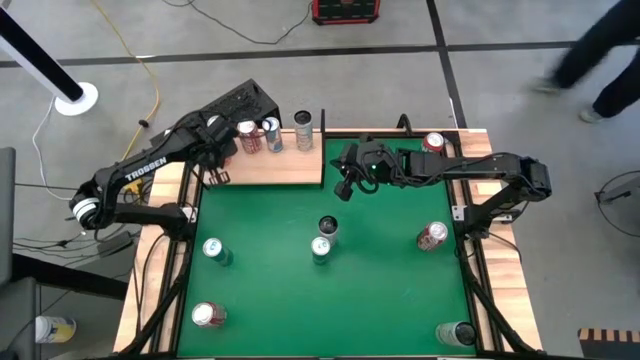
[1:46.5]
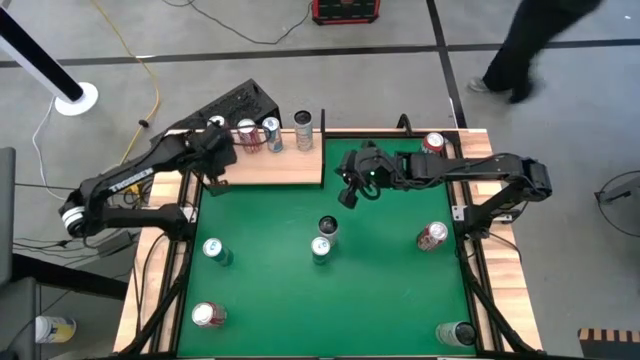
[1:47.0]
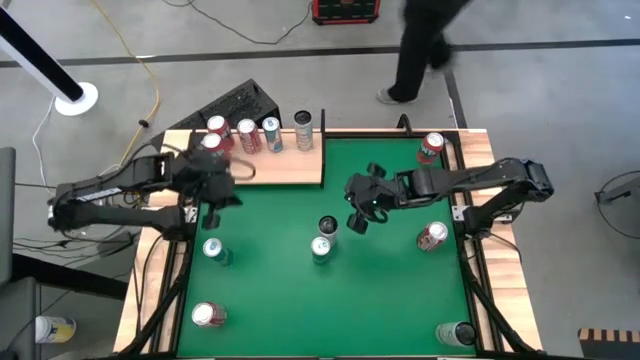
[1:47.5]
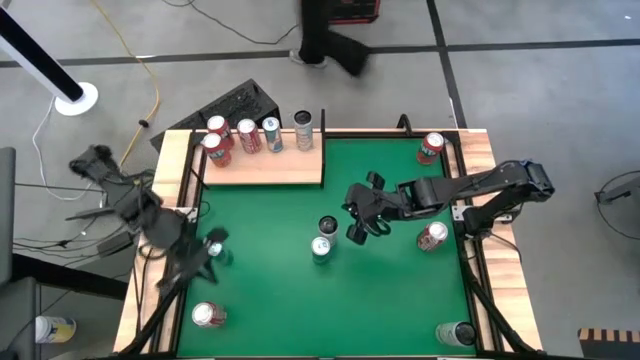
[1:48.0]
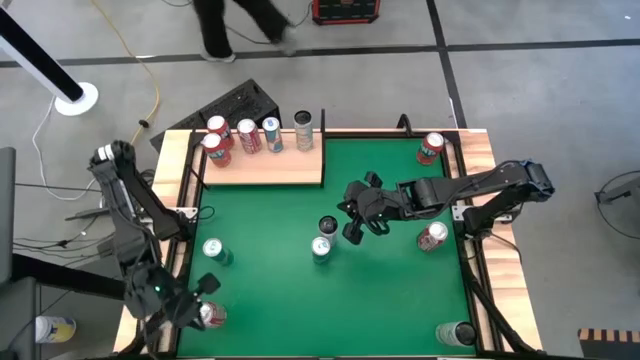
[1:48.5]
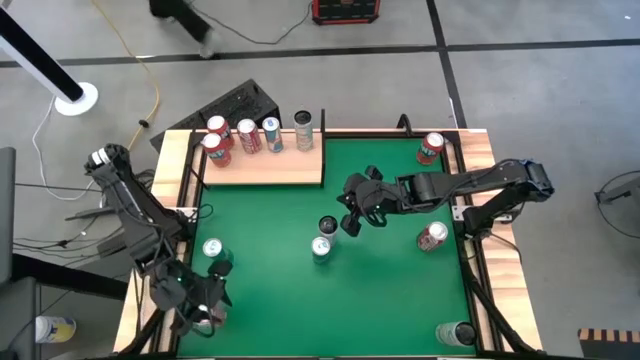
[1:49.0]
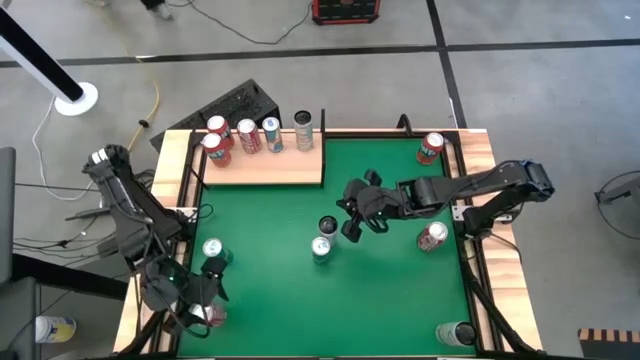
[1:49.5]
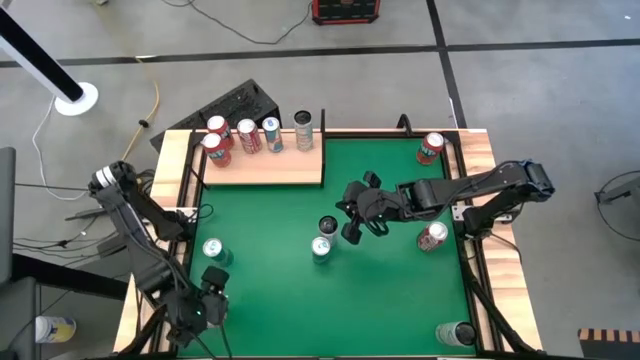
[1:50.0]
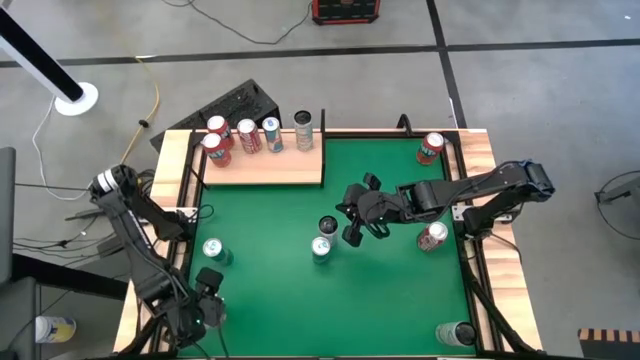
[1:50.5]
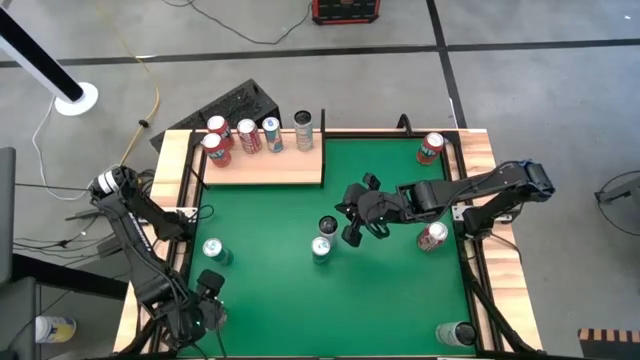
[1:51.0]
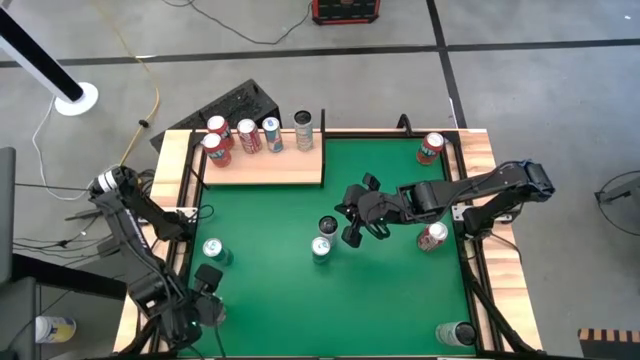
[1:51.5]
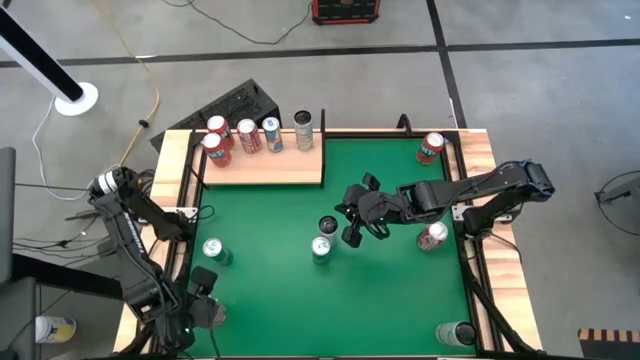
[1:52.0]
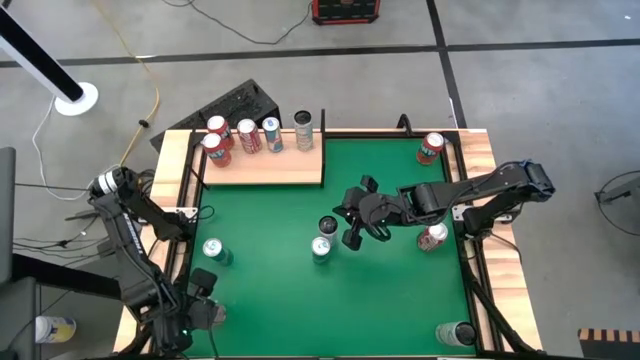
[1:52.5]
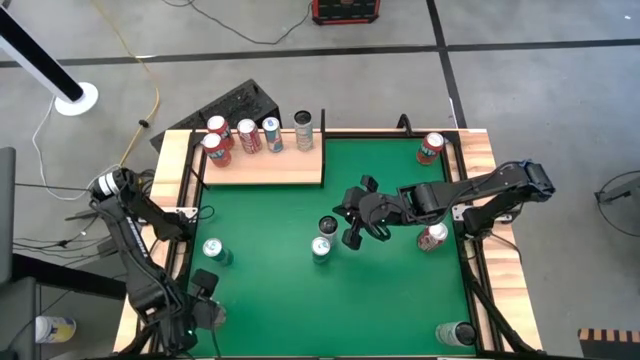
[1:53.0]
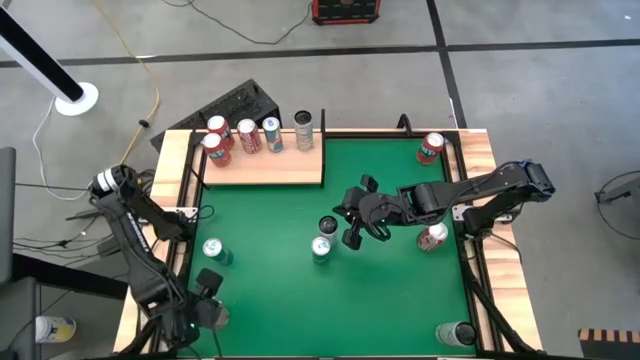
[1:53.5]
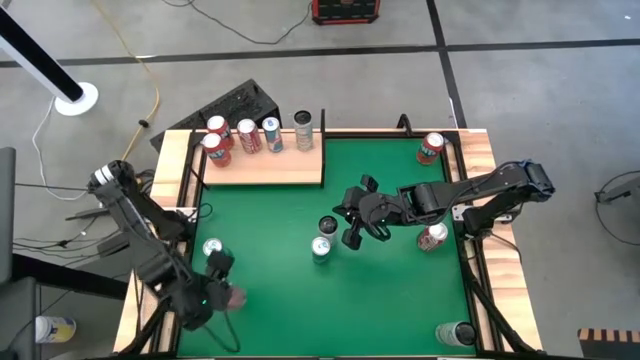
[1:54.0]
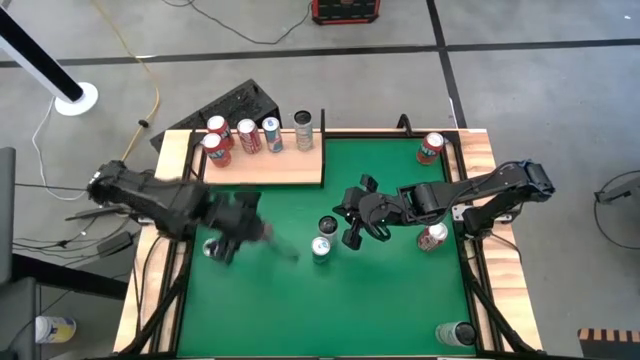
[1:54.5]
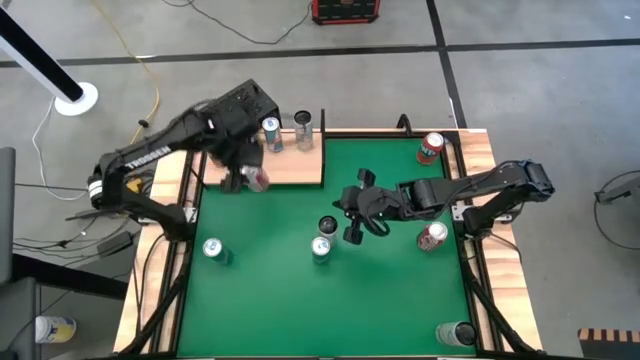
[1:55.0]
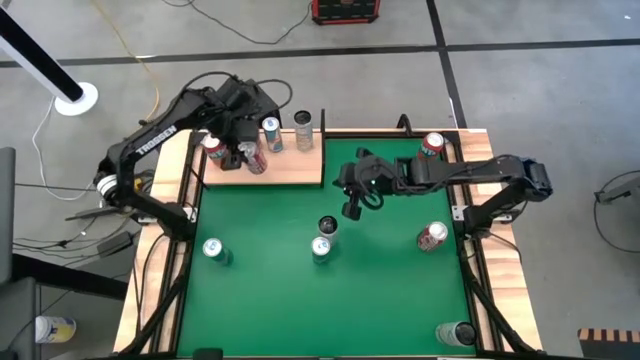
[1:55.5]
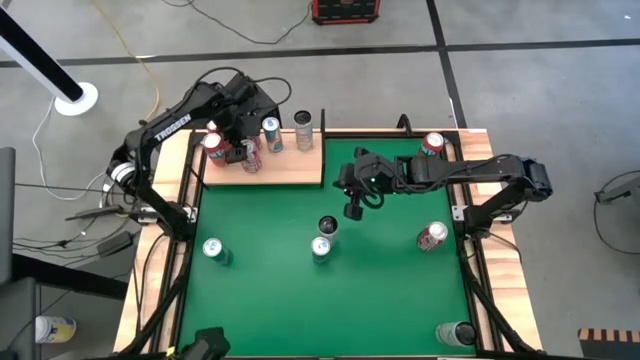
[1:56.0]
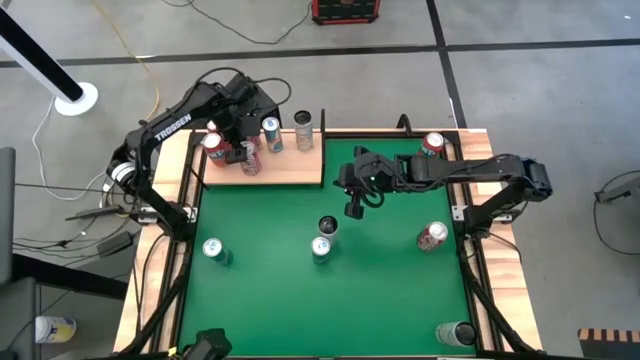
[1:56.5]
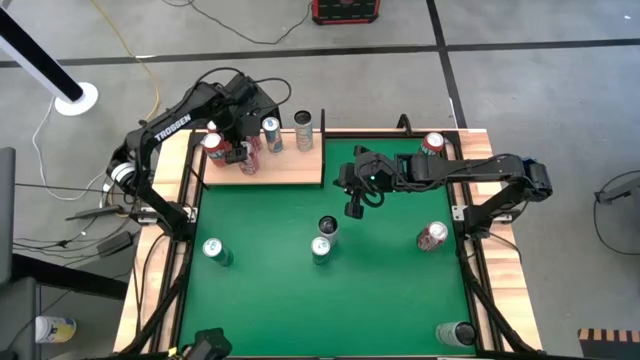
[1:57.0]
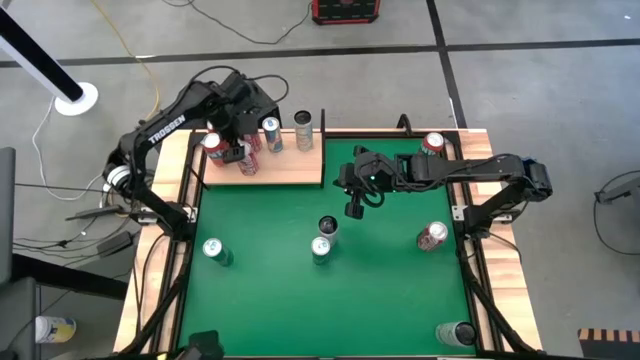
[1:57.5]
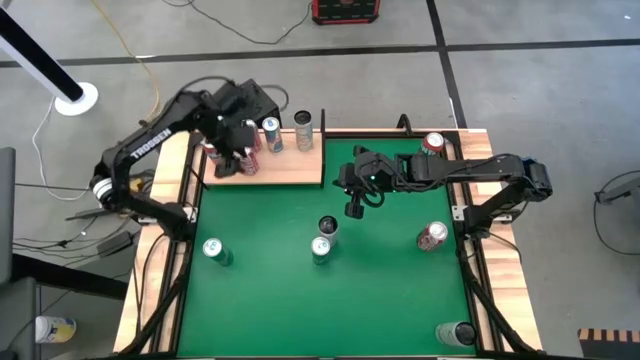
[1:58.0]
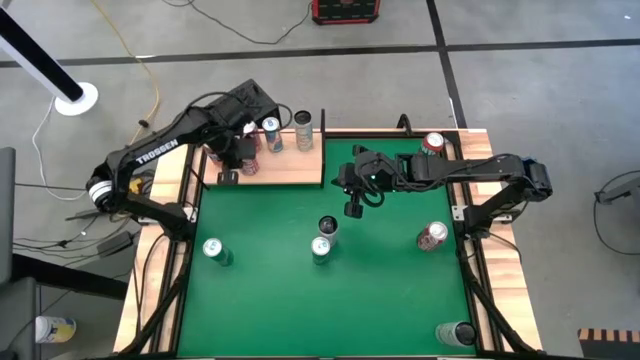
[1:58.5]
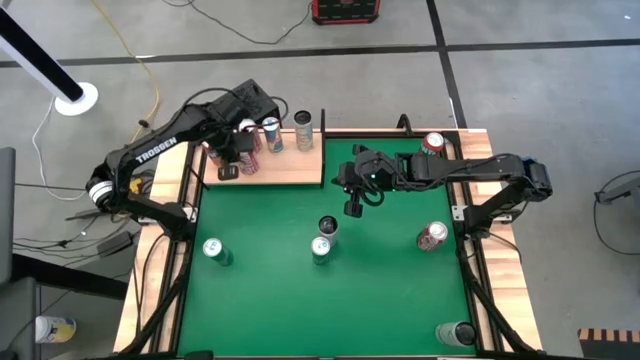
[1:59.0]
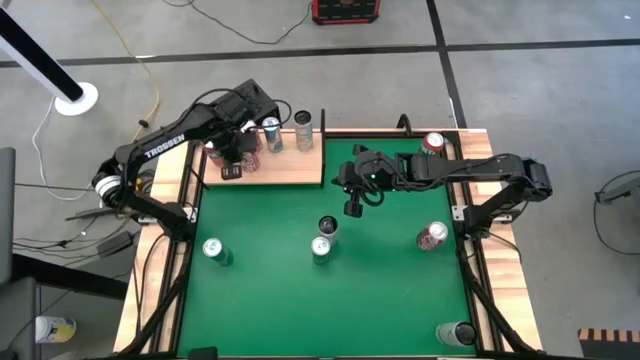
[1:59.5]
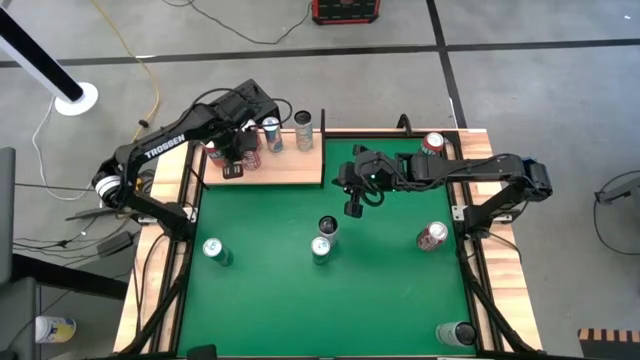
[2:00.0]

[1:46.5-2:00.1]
Task: Place canned beverage on shelf
Put the bottom red and white soda can on the shelf aligned with the other red and white soda can

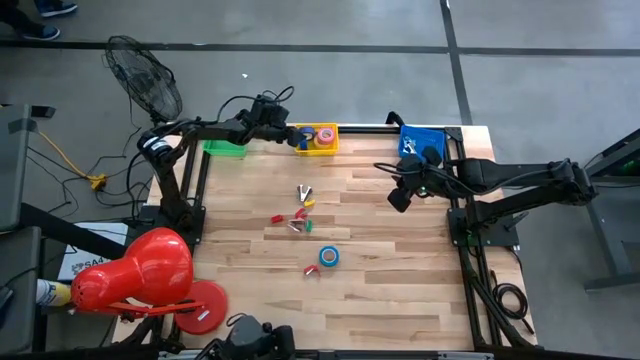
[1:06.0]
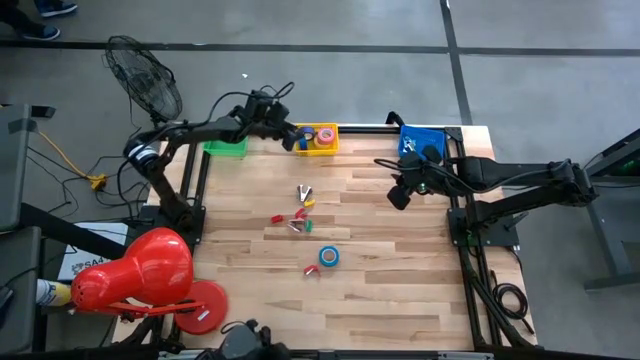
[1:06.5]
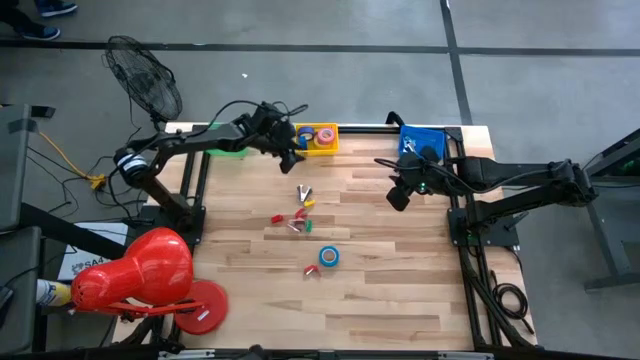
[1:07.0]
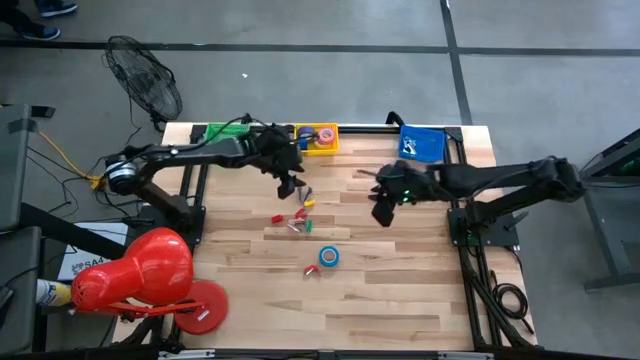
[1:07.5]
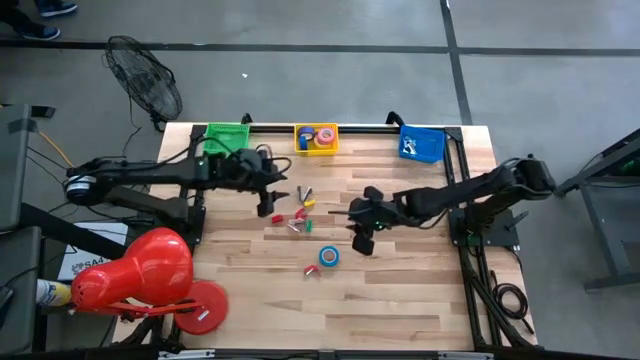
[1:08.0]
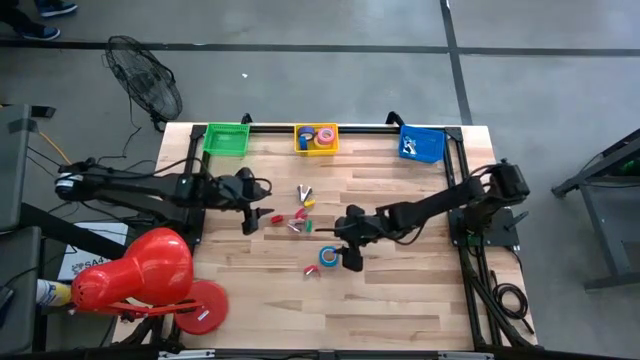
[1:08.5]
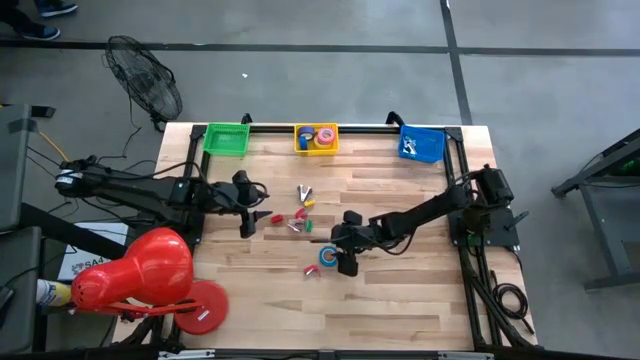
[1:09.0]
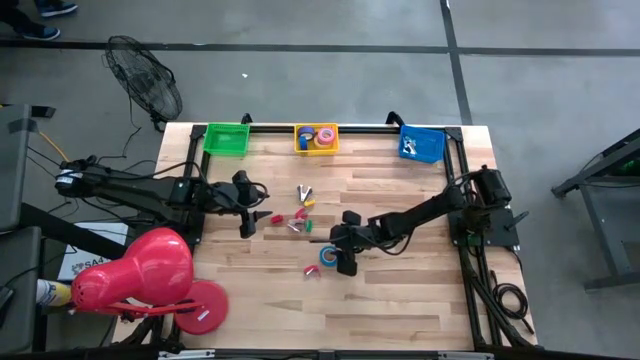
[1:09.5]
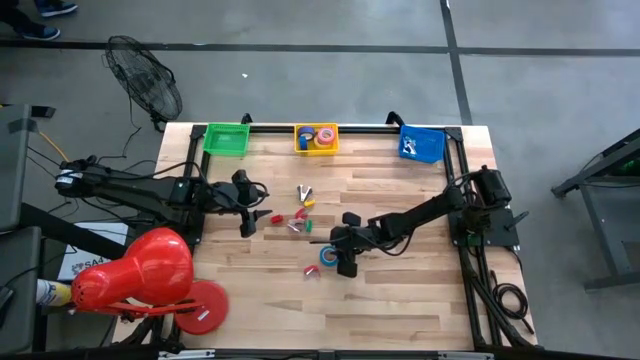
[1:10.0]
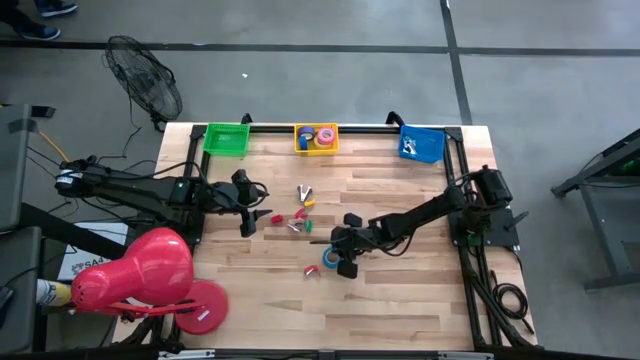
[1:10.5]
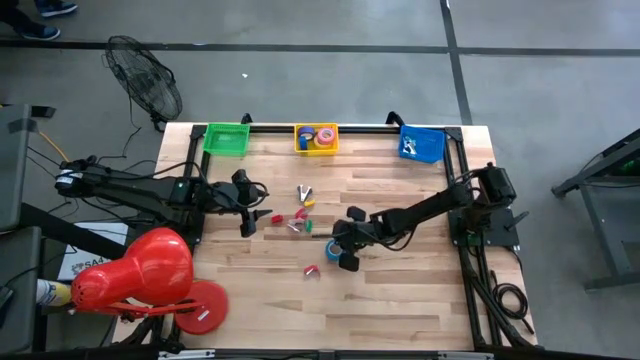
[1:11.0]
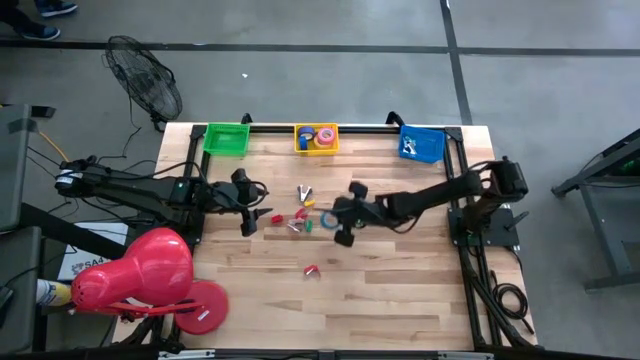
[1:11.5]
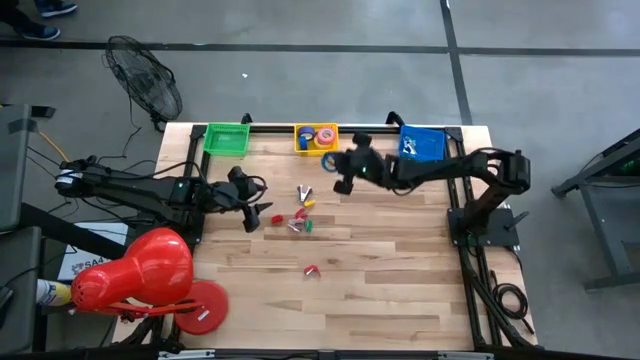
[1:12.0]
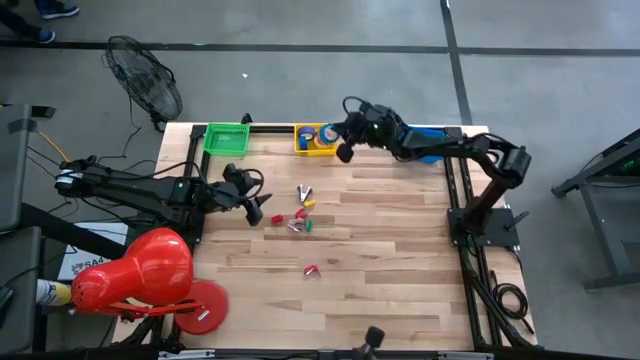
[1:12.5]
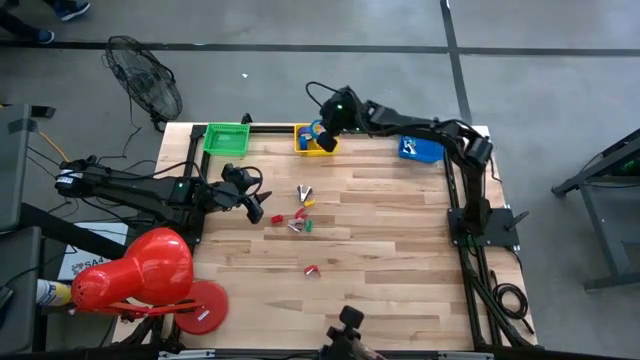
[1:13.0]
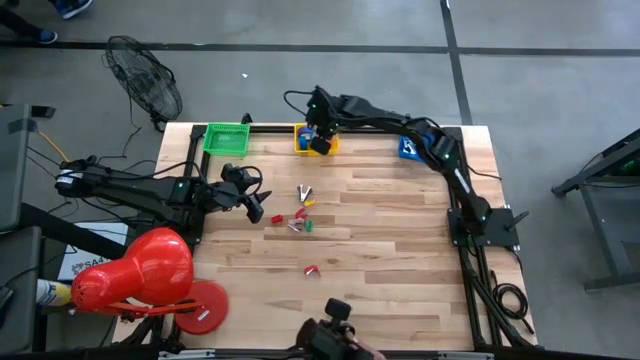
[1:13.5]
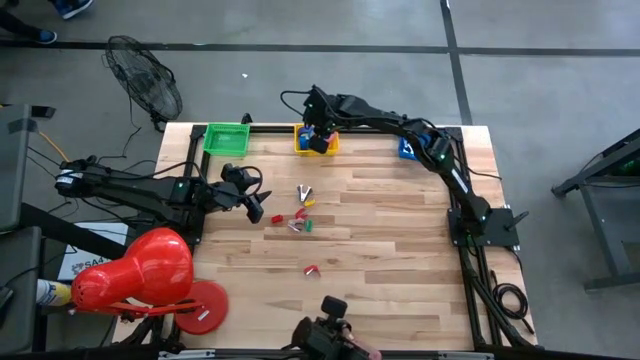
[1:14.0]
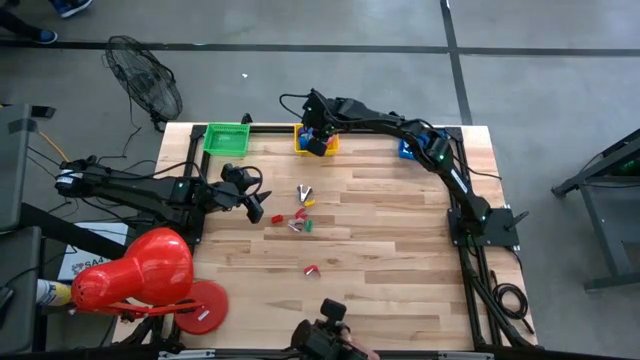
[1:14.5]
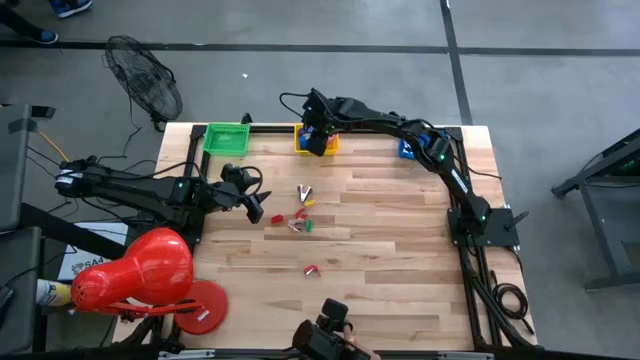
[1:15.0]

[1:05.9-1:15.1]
Task: Pick and place Stapler, Stapler remover, tape
Put the blue tape into the yellow bin
